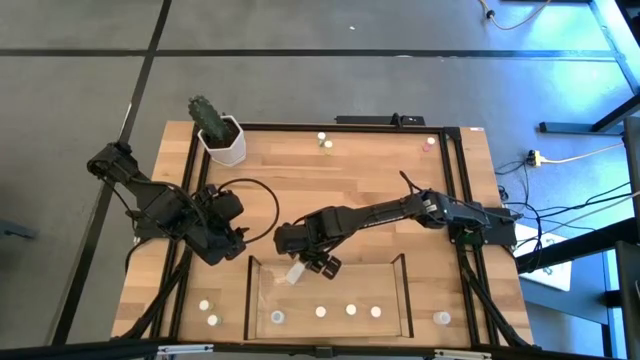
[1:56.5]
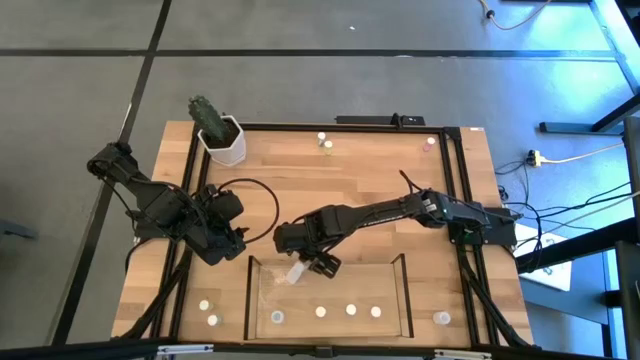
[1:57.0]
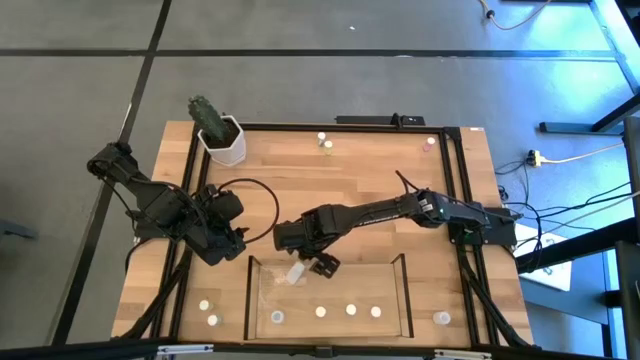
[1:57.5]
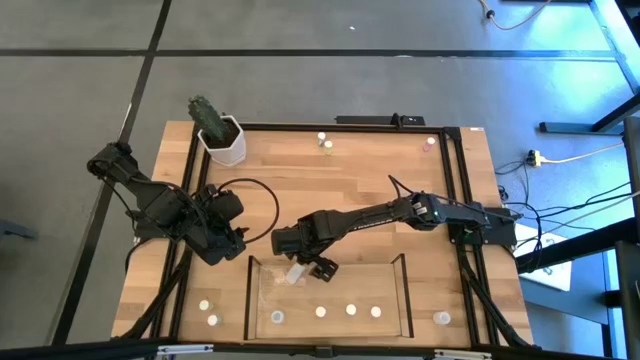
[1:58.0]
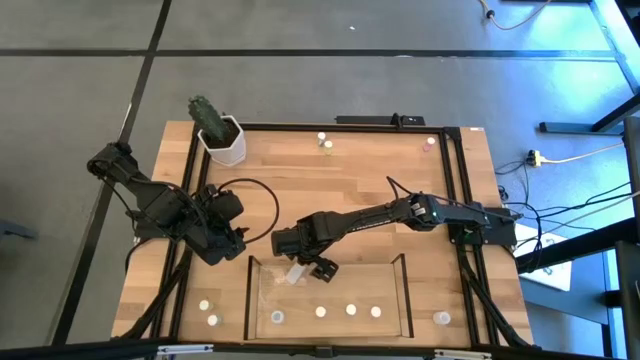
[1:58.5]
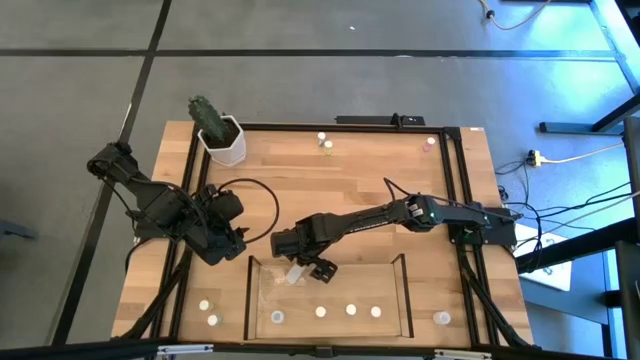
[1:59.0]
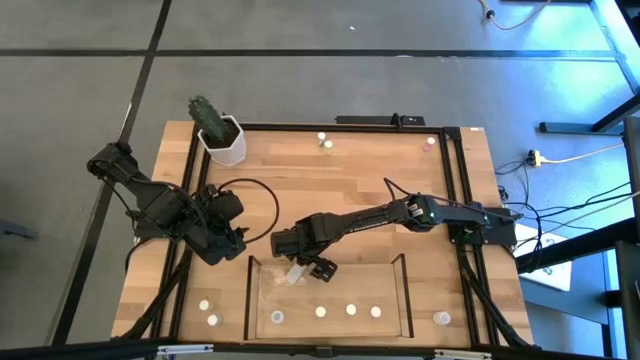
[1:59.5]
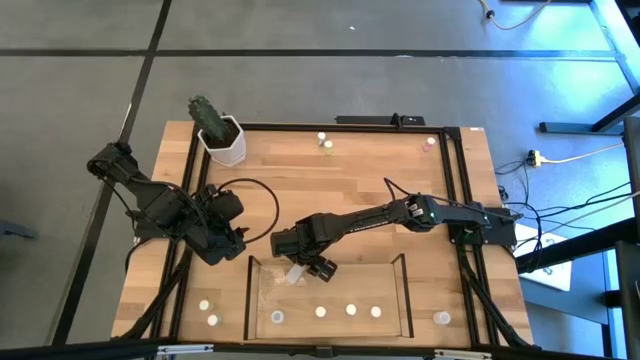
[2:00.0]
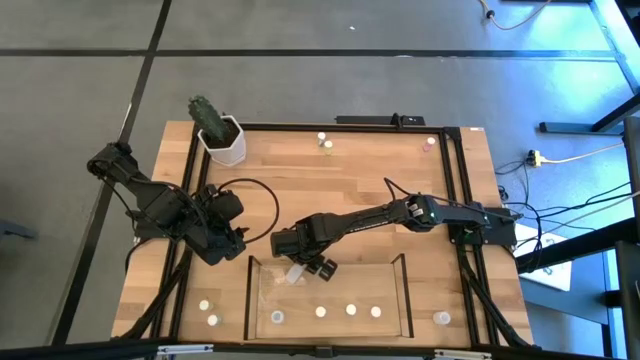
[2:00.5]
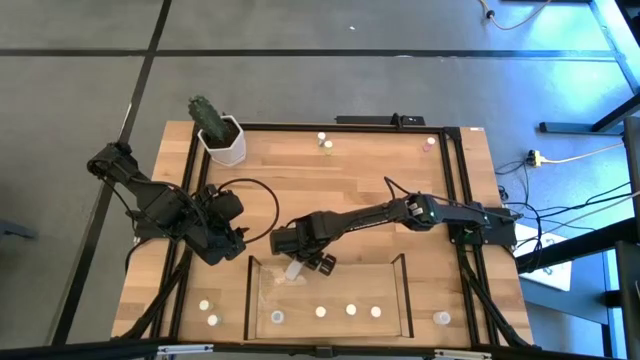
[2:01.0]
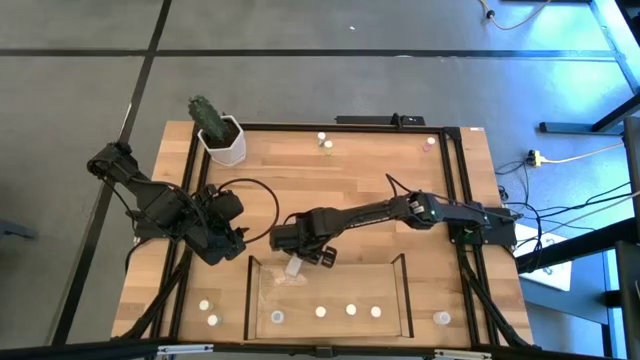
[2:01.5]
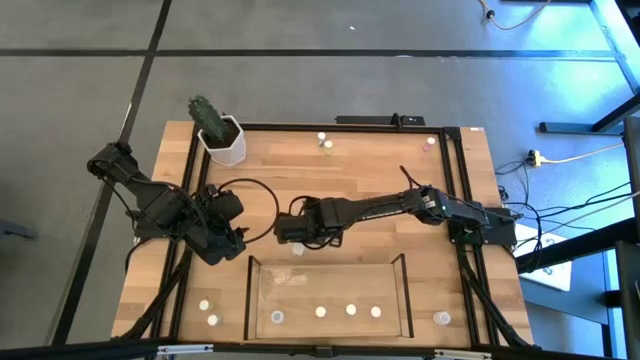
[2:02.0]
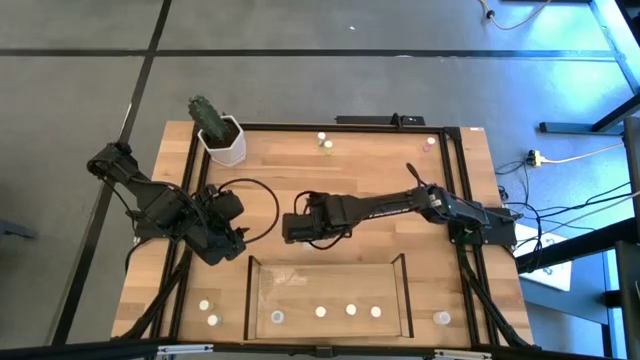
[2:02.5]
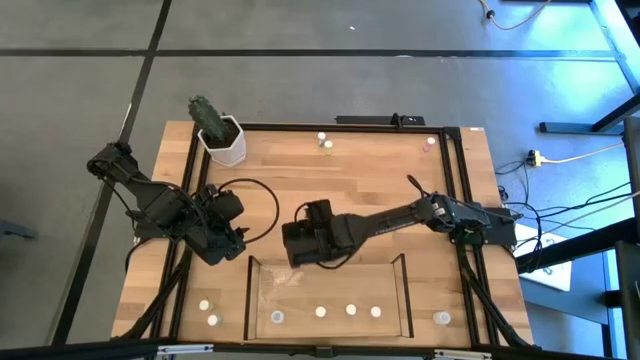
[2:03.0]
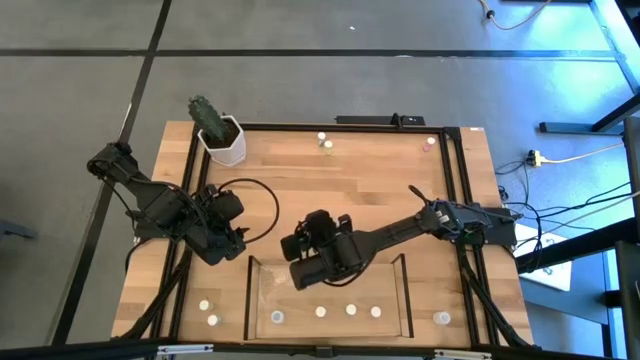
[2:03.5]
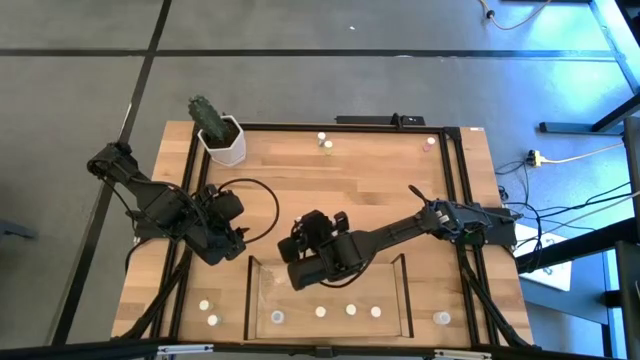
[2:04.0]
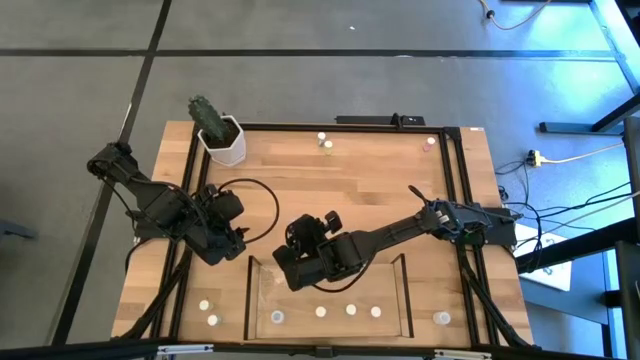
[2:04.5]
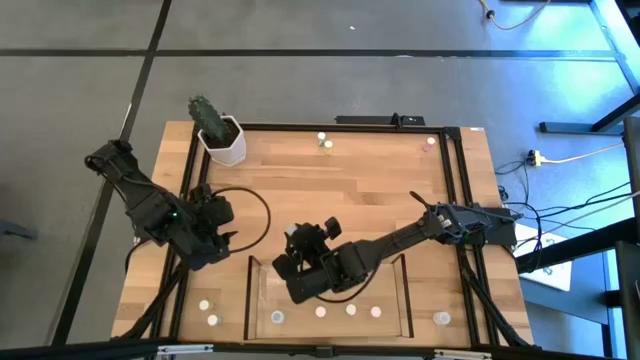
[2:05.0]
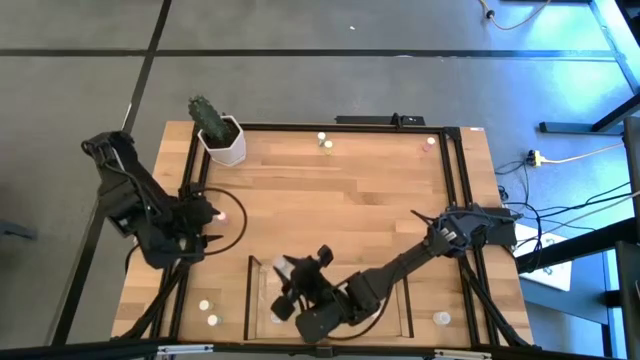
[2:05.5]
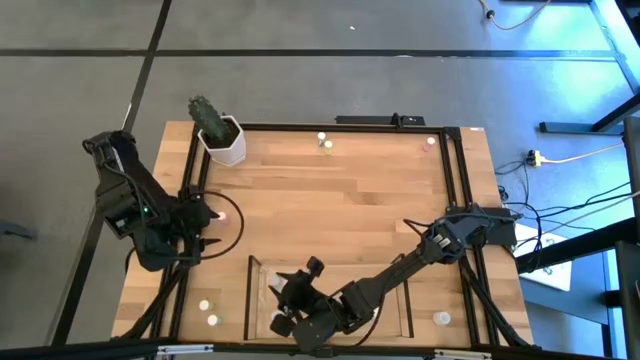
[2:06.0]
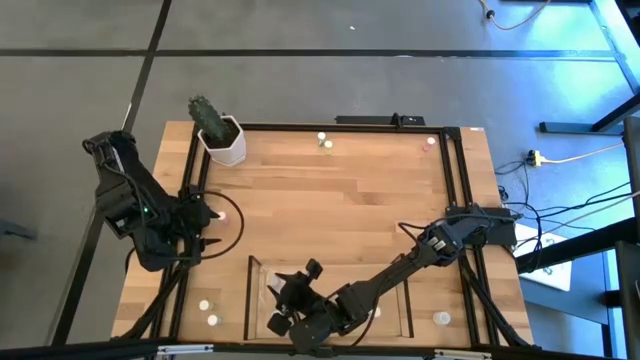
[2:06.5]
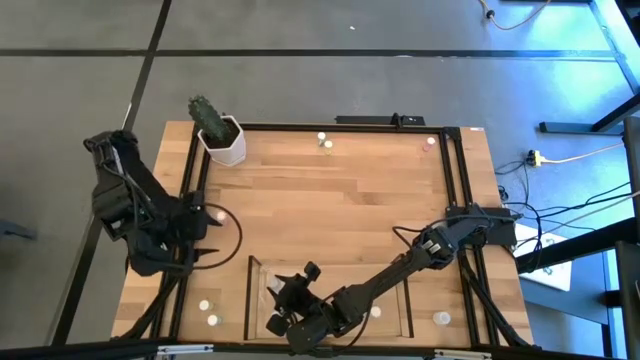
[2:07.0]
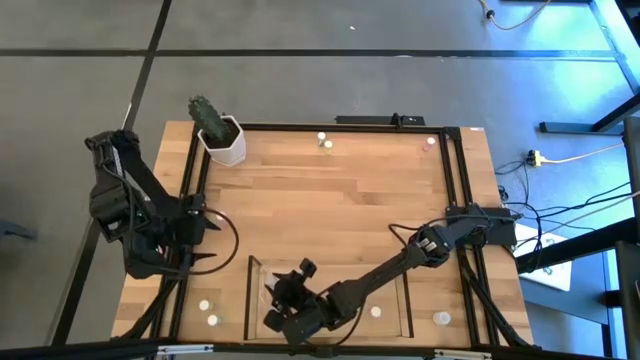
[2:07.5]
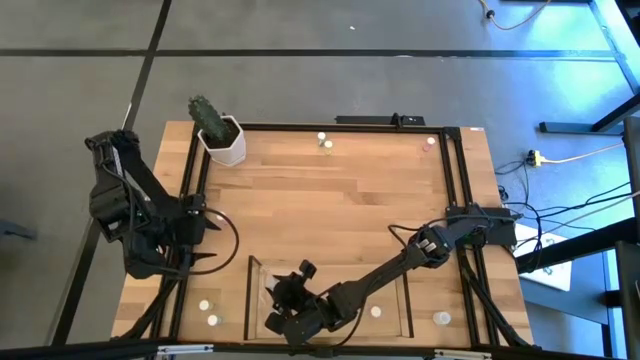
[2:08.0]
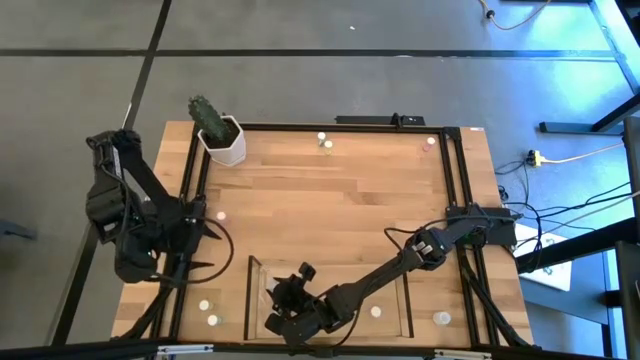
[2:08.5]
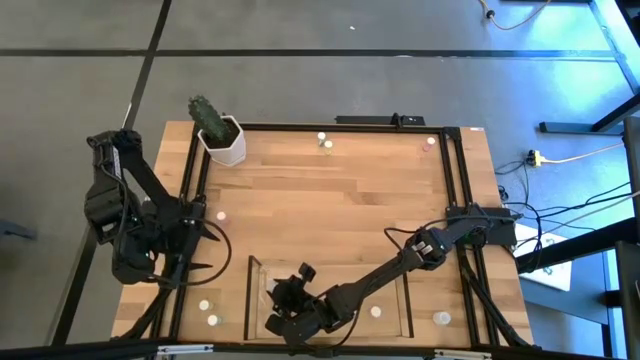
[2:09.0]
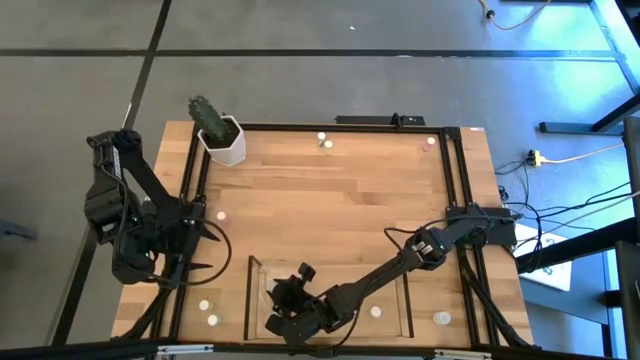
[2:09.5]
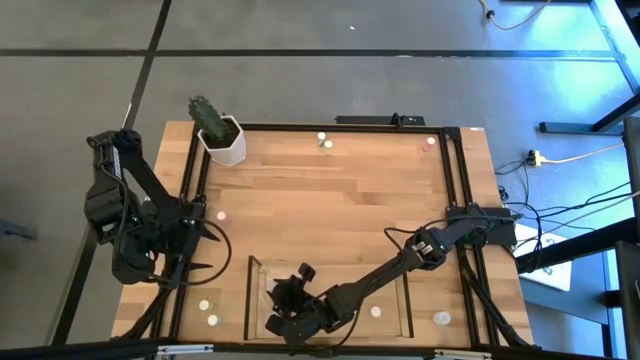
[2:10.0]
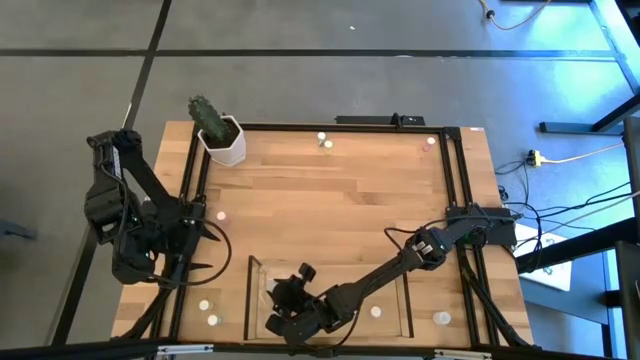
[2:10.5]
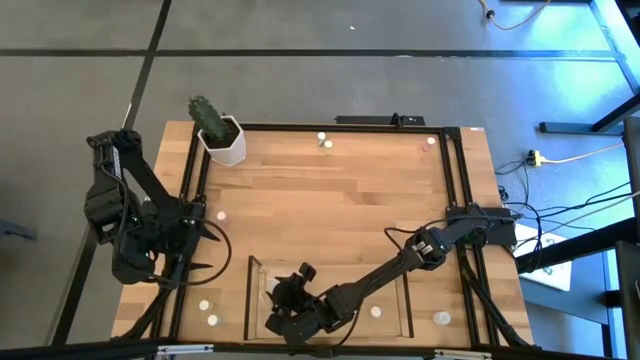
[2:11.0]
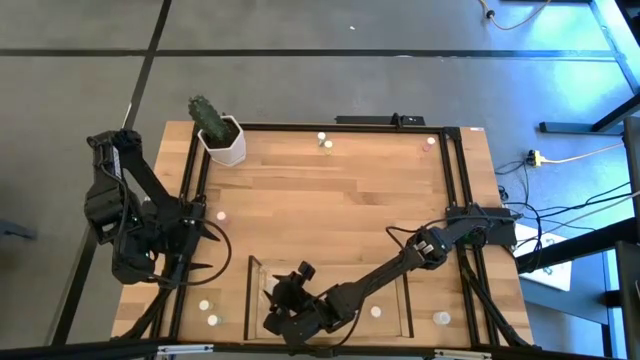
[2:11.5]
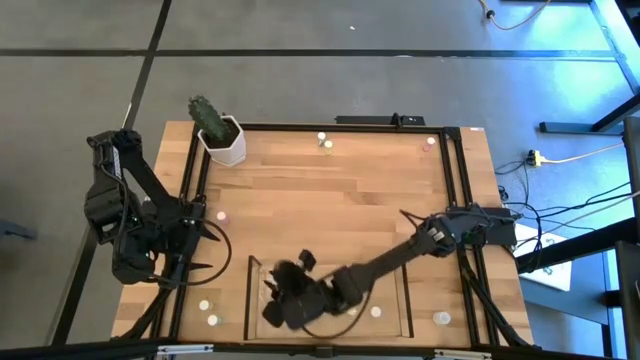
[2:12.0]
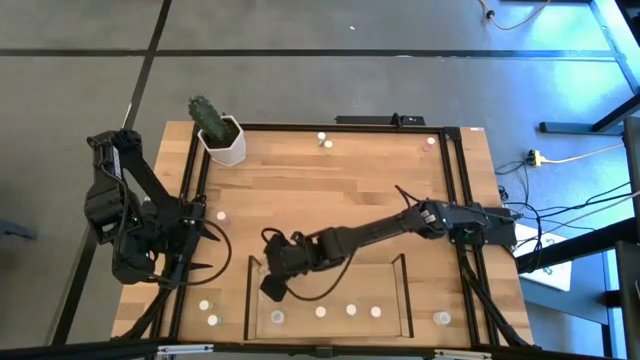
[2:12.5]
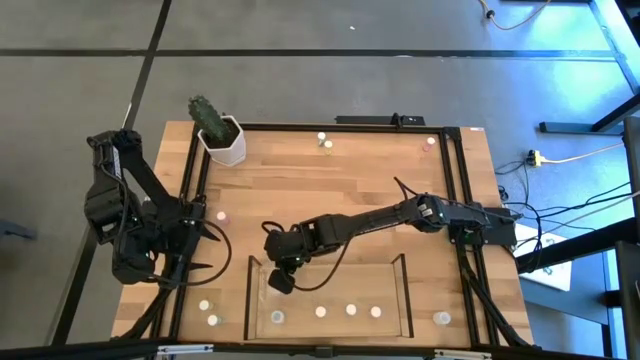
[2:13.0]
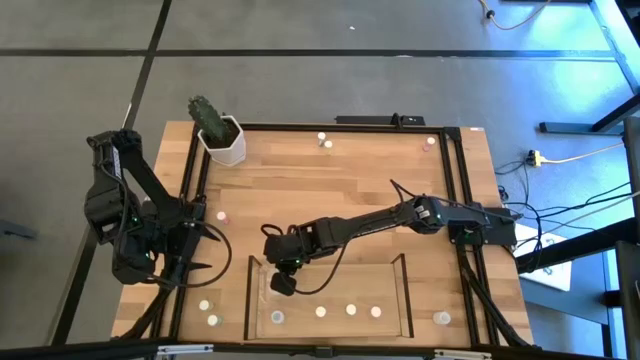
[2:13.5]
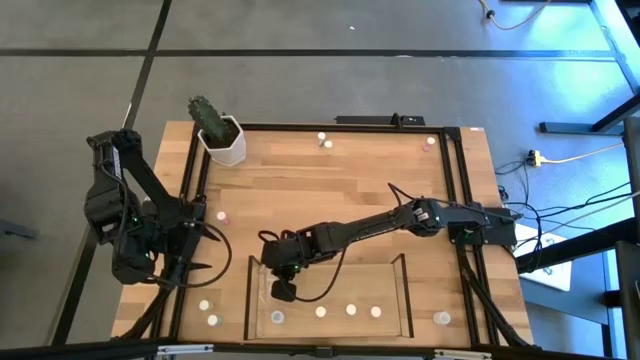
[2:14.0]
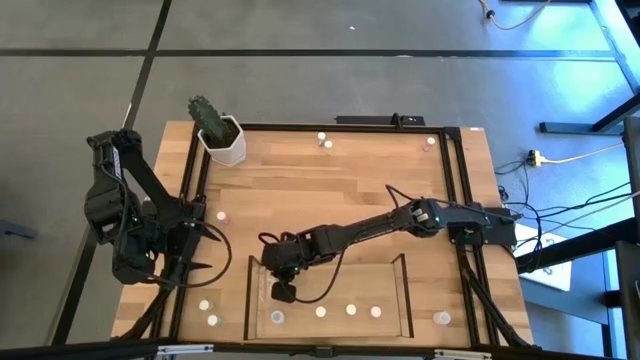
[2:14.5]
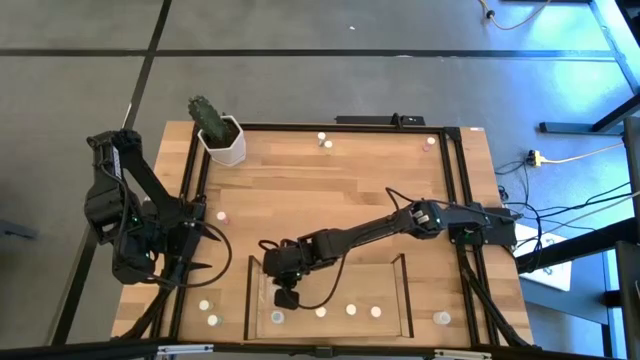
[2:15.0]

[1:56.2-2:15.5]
Task: Pick and place medicine bottles onto shelf by color
Put the top white pill bottle on the shelf aligned with the other white pill bottle

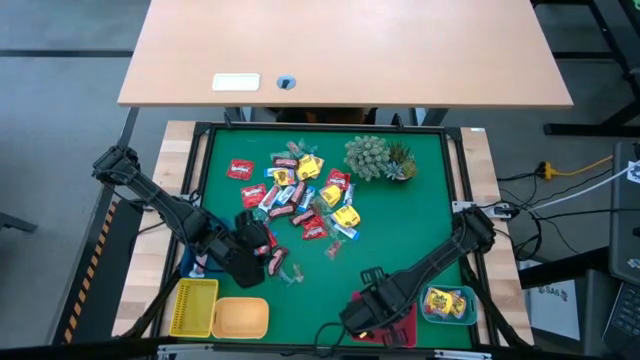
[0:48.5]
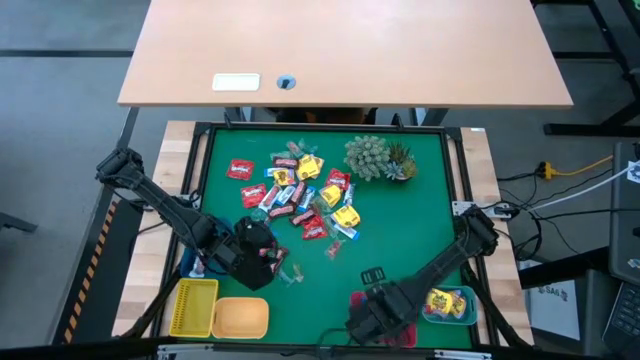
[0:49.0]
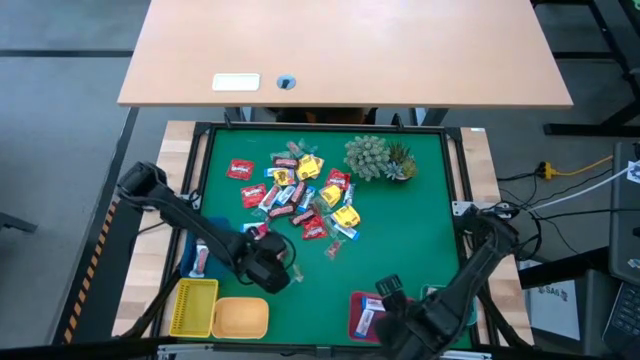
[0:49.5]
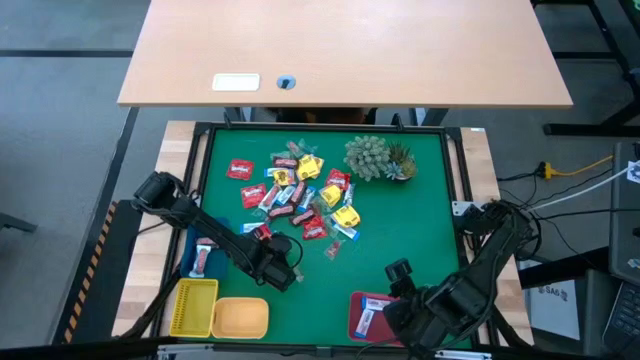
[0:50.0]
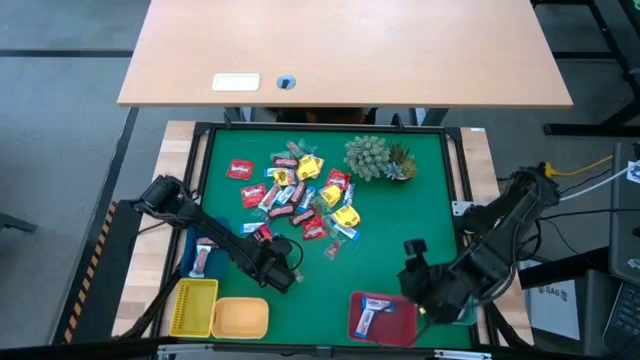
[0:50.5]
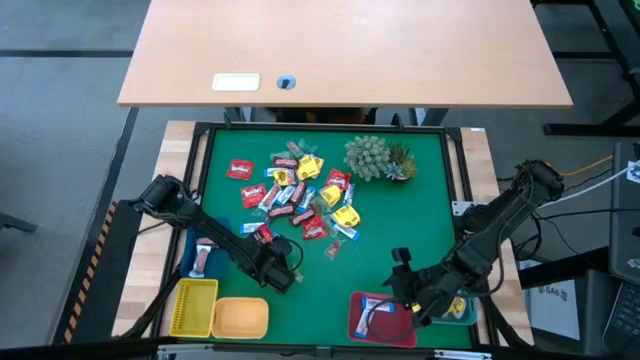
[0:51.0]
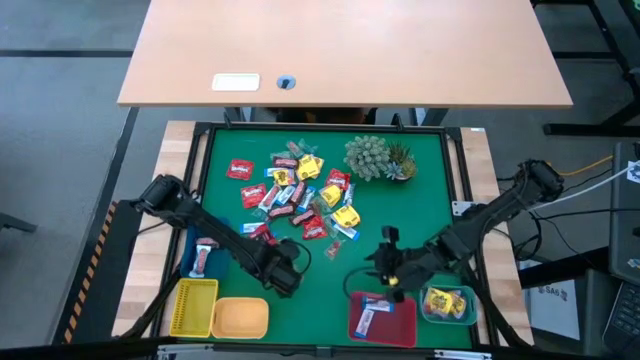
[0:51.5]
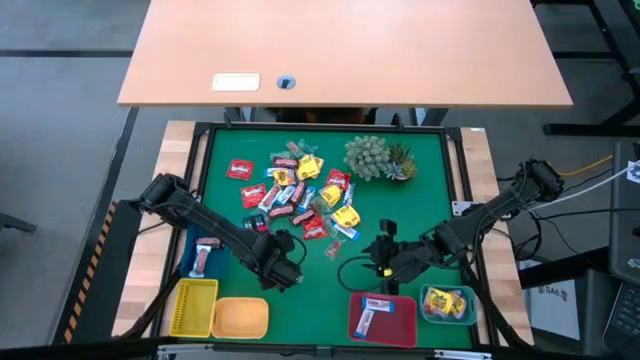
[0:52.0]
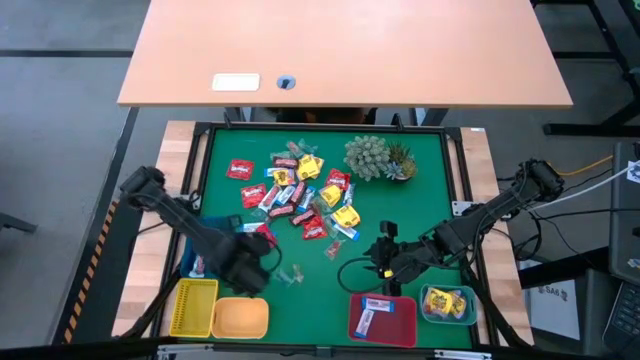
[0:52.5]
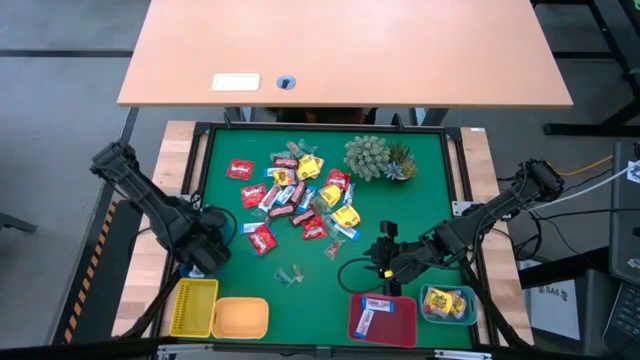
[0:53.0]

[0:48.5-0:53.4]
Task: Sort candy
Put the brown chocolate into the blue bin
